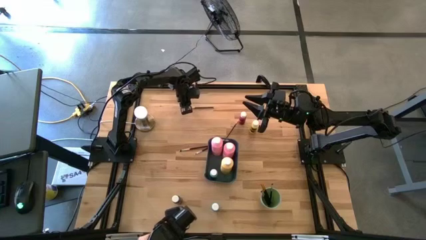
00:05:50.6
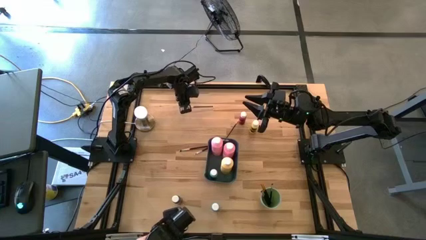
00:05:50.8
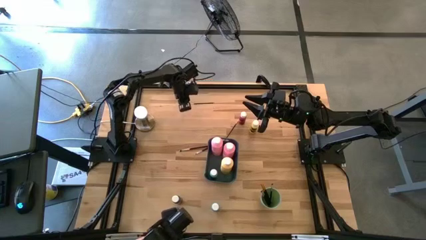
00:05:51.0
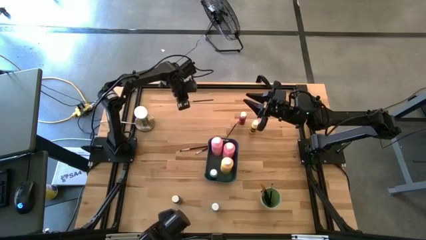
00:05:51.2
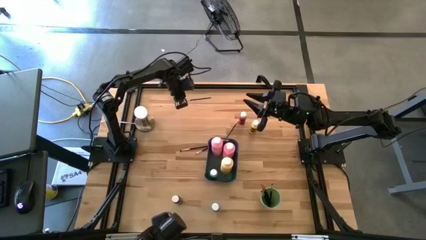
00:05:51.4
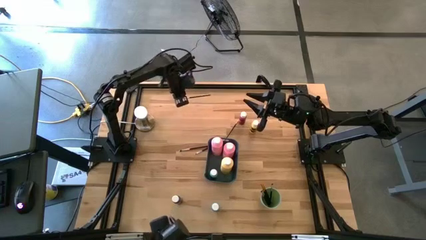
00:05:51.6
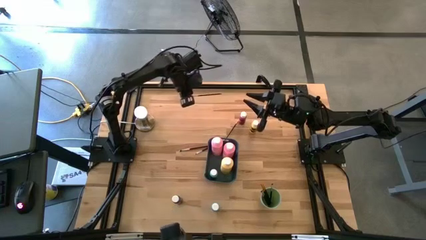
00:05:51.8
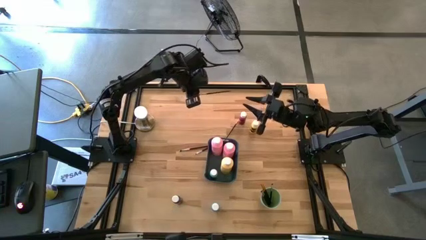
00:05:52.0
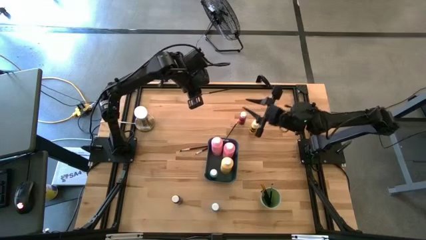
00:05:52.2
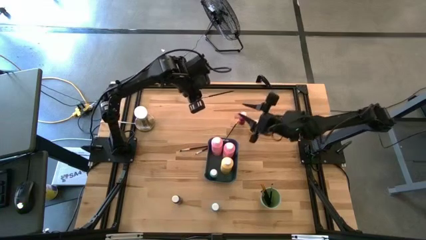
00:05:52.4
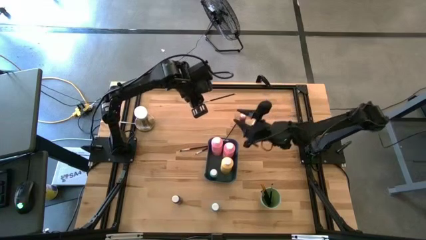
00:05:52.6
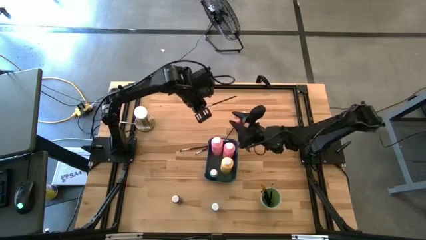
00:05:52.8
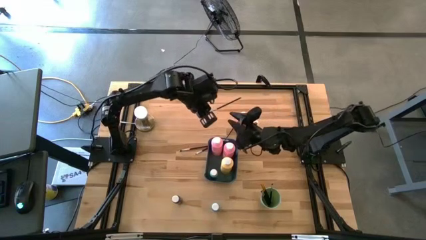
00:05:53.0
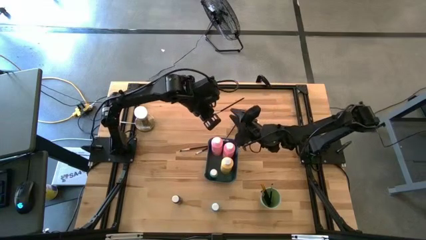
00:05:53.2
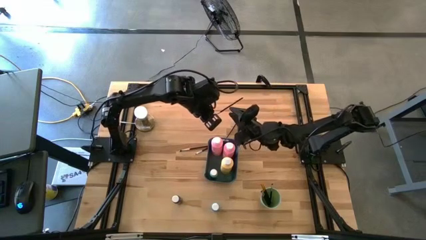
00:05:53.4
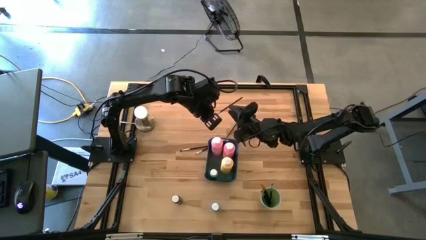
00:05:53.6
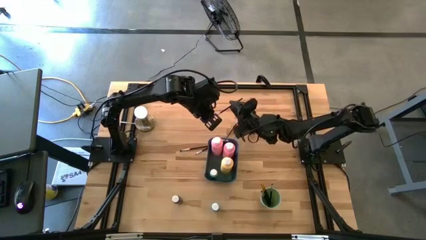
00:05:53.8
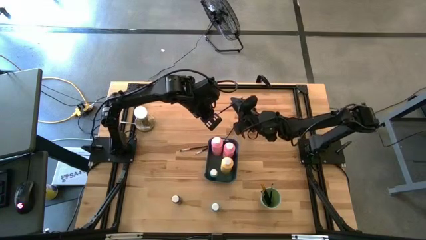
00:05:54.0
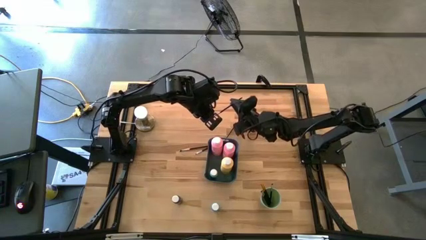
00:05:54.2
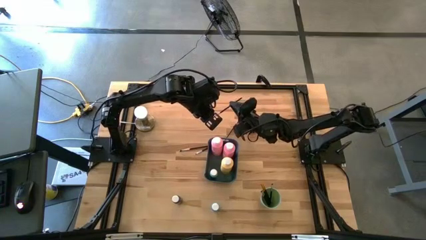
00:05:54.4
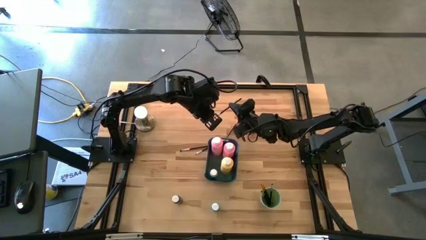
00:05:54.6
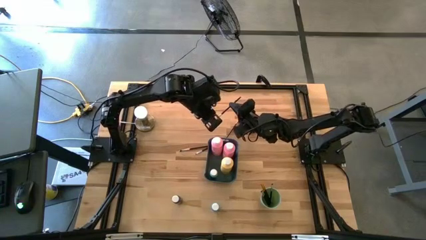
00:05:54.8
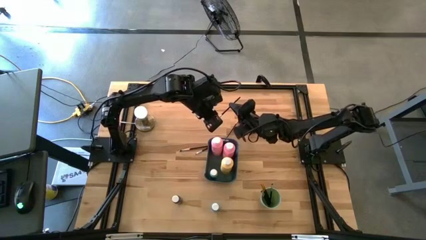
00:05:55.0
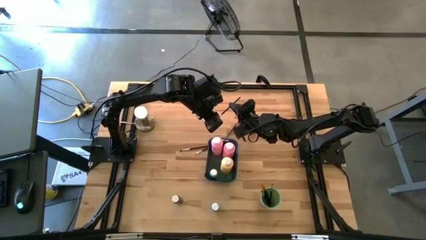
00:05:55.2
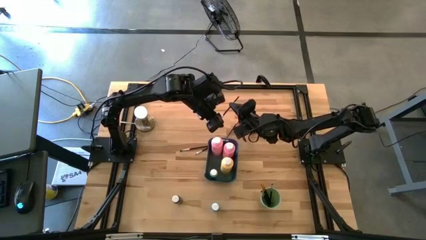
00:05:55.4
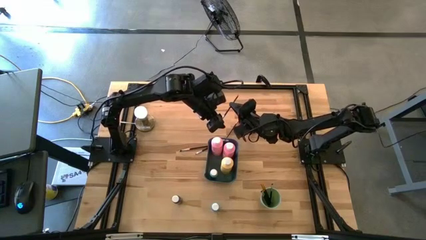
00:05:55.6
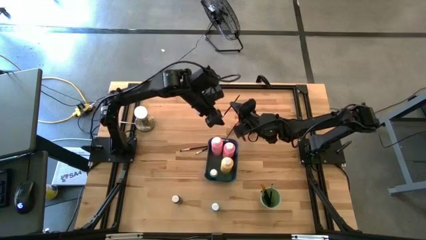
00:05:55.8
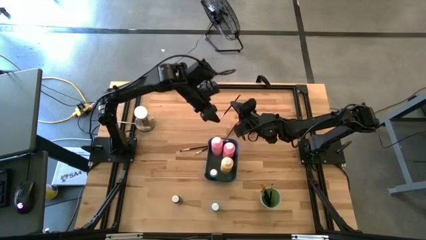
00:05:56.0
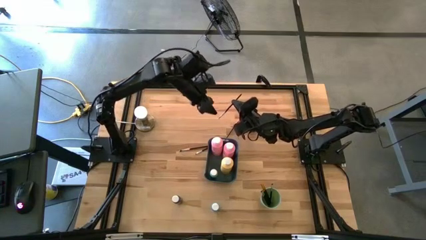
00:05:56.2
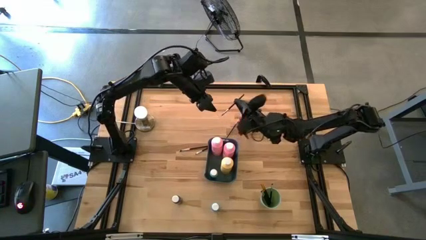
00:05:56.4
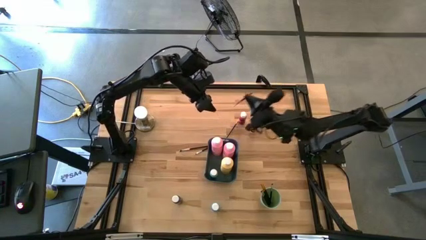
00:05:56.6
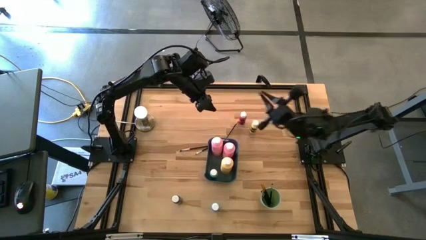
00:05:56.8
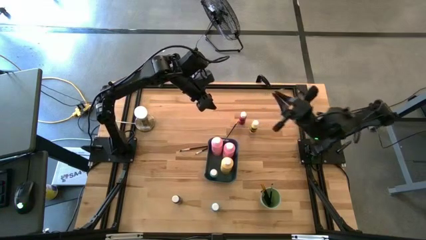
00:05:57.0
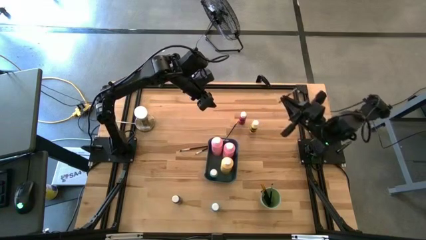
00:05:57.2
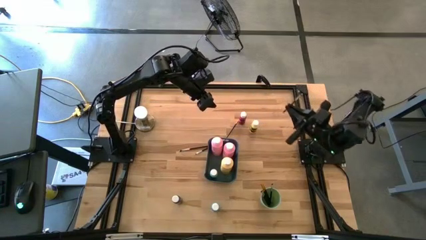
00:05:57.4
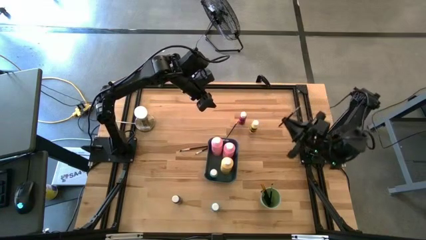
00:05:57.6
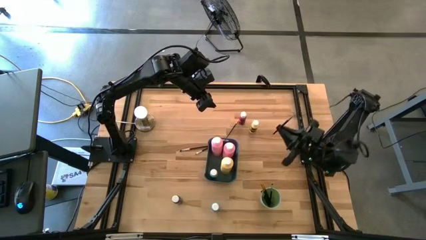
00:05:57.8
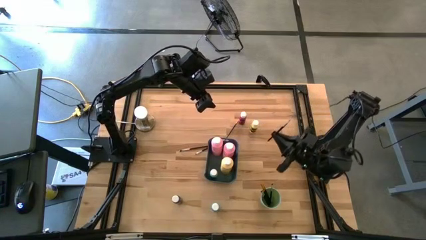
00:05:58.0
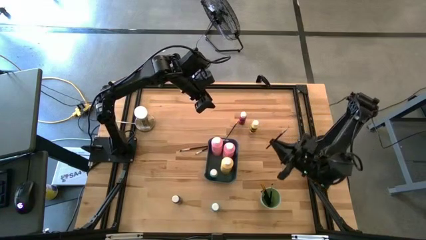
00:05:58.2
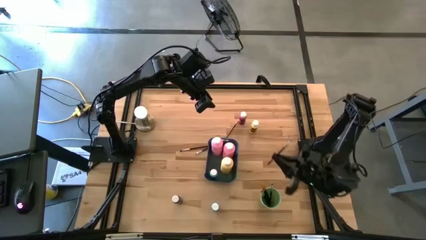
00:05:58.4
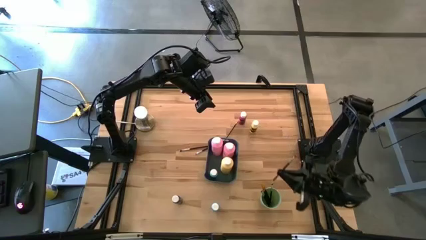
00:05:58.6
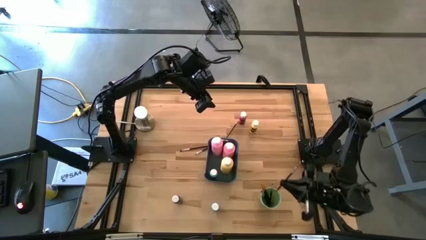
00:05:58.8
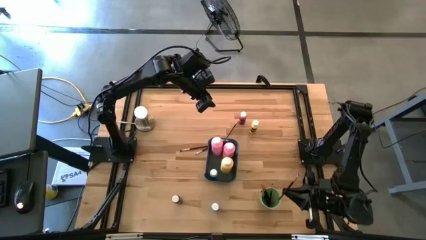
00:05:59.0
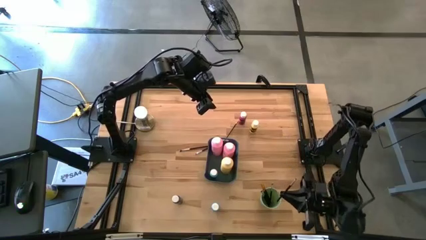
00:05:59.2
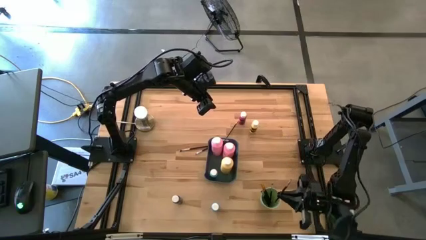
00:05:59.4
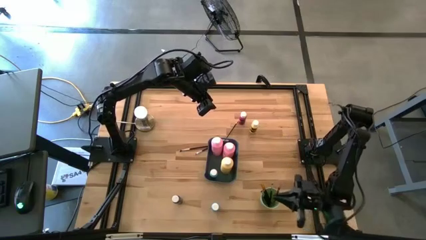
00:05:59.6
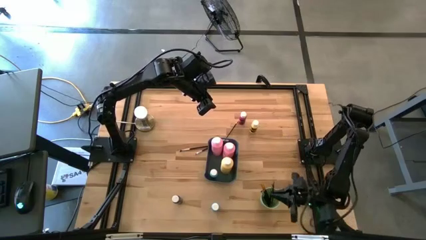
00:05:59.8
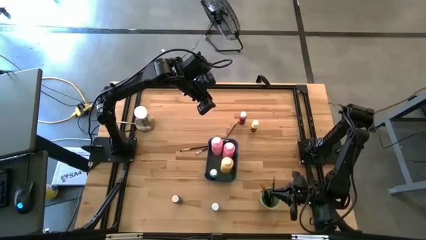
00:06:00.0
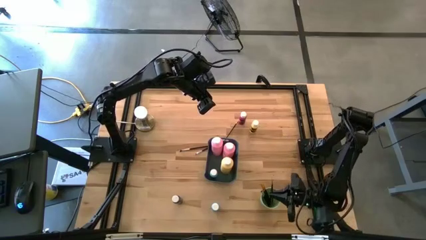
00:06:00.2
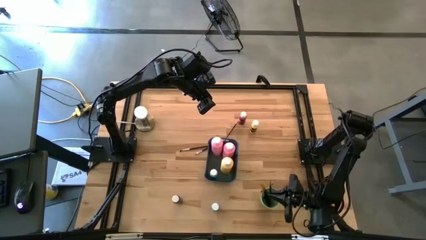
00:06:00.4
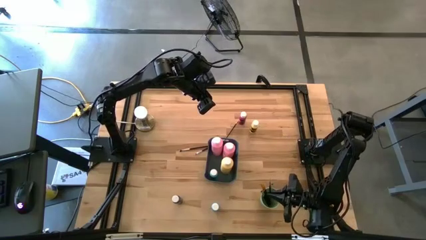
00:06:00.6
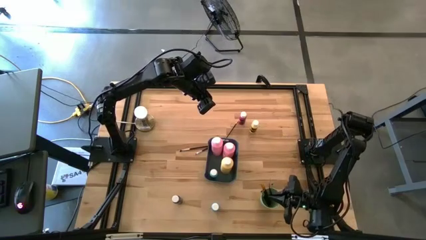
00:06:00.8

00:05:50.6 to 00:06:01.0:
Task: Pick & Place Paint Supplies
Put the black and silver paint brush into the green cup

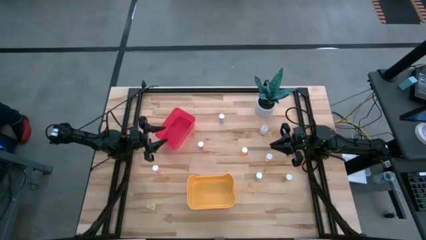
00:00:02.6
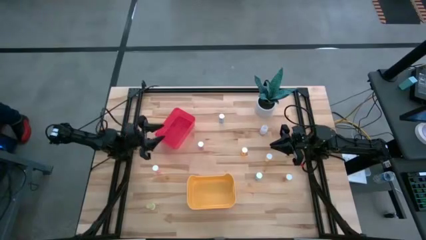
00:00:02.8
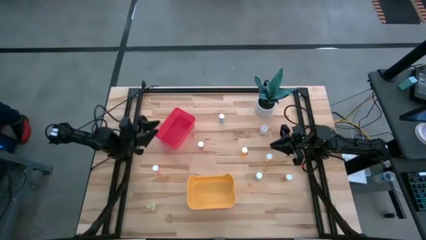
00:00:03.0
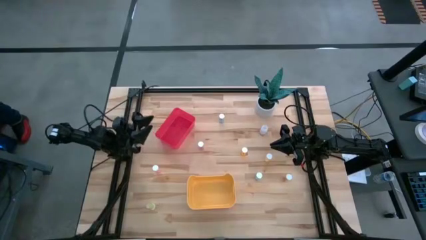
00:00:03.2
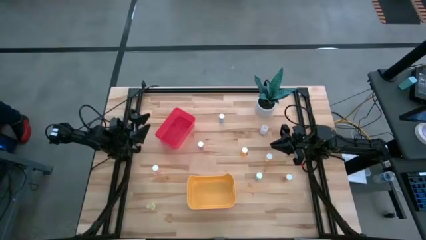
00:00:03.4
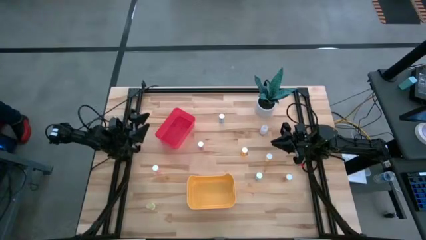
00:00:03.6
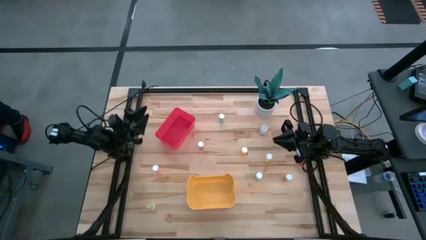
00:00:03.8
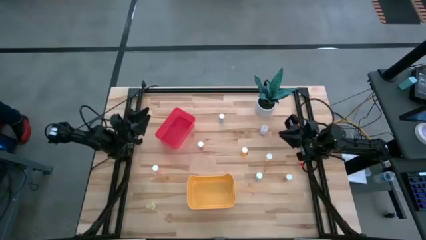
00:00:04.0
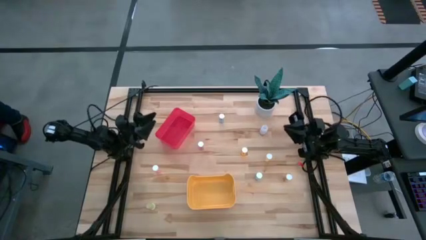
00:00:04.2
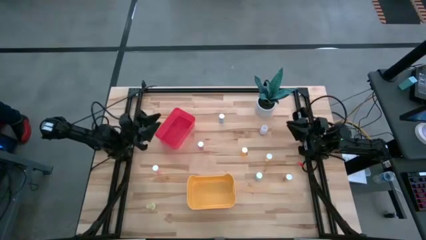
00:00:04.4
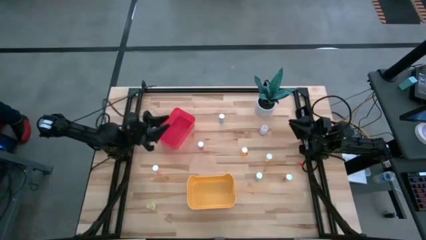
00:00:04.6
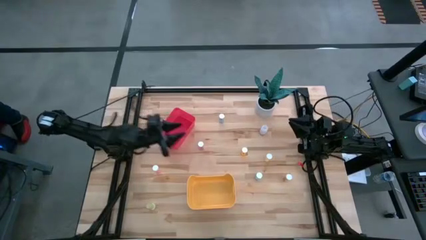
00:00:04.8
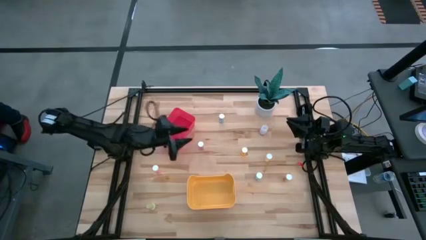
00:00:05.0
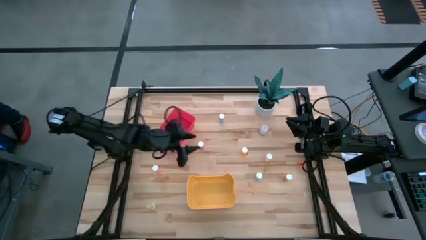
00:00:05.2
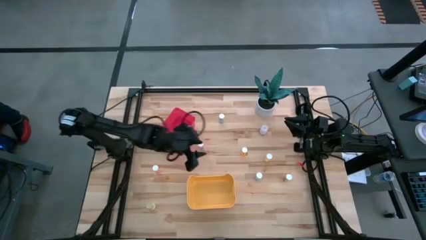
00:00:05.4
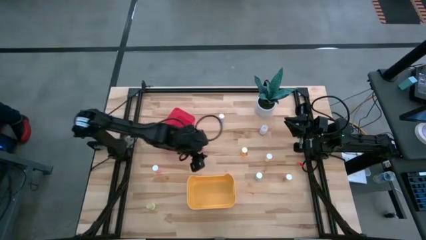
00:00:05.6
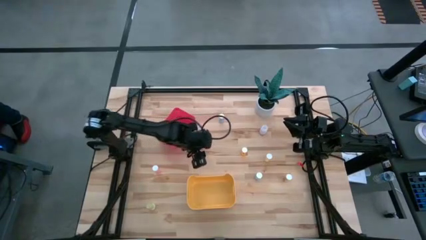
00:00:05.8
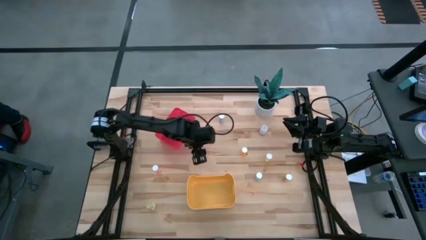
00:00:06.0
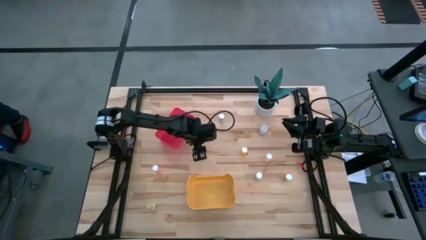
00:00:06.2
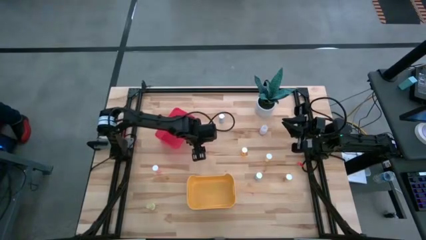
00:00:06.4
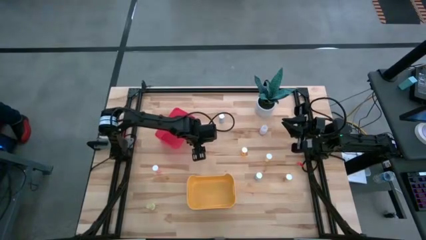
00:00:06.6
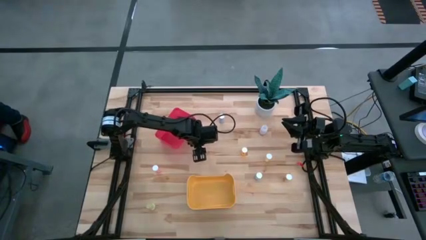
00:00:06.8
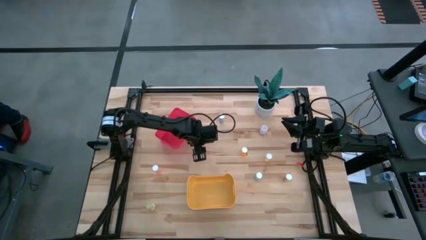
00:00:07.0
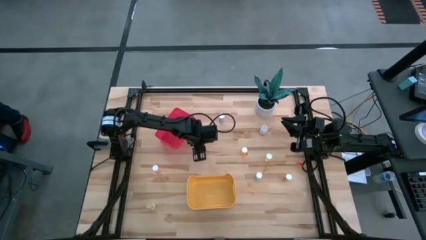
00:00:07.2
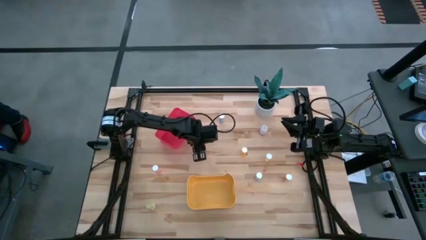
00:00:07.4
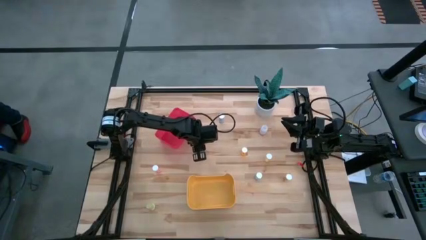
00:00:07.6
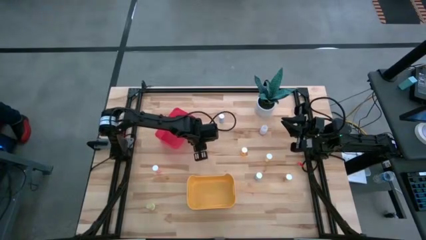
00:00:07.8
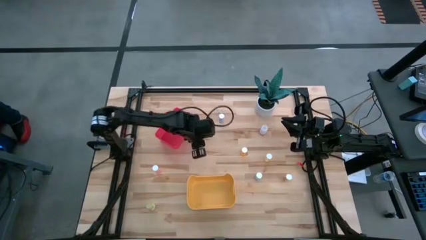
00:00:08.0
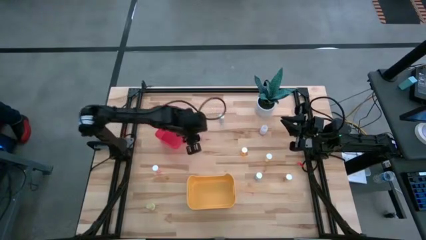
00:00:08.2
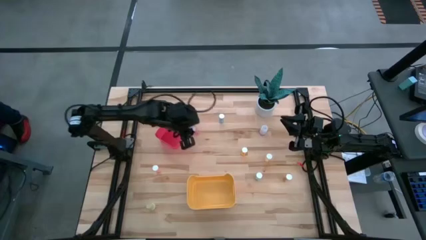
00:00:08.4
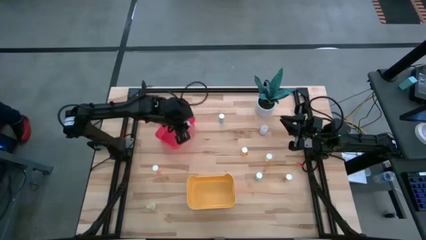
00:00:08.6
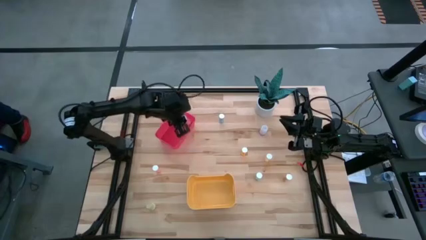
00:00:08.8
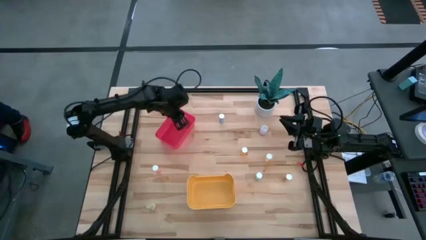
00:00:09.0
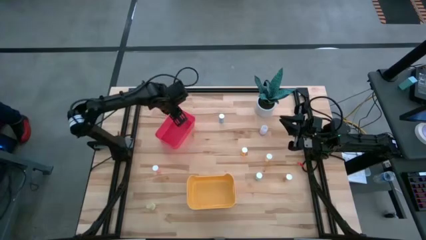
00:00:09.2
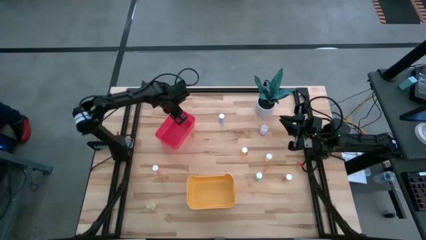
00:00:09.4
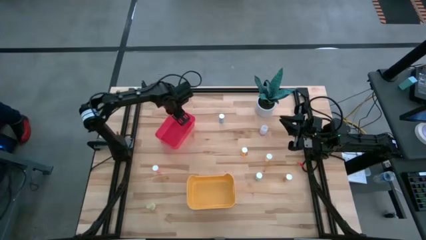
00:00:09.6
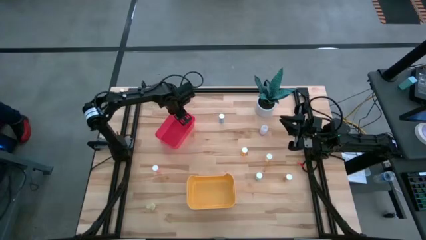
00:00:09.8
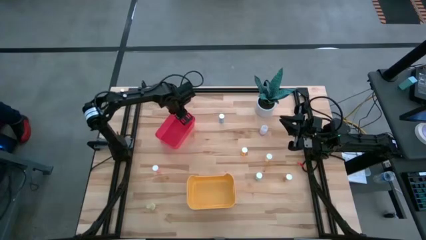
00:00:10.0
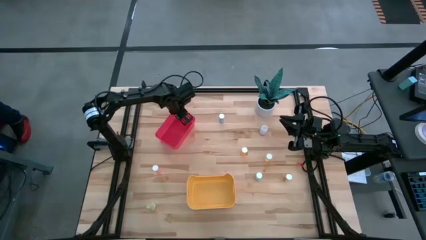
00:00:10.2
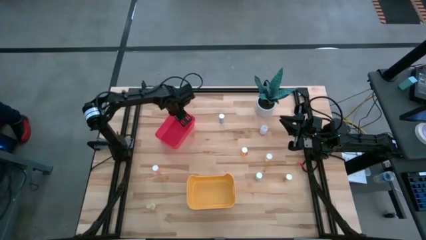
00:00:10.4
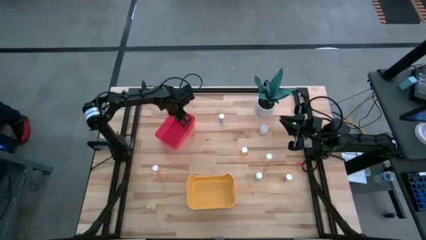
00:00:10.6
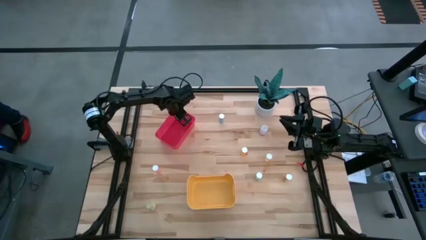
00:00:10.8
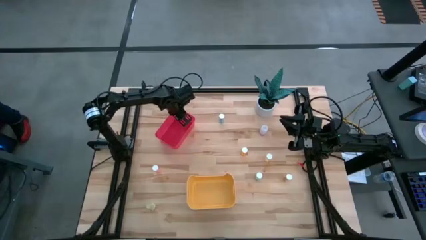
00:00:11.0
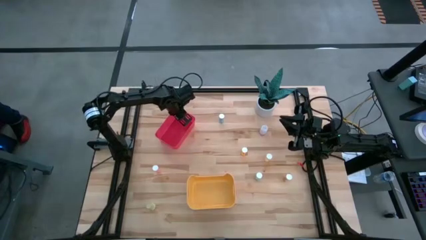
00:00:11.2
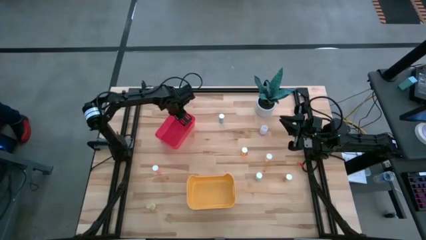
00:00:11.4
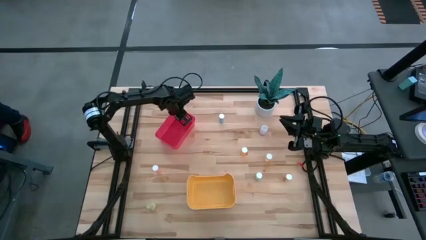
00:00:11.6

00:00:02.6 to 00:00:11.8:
Task: Pick and place medicine bottles into bin by pill shape (circle, oval)
Put the pink capsule bottle into the red bin
